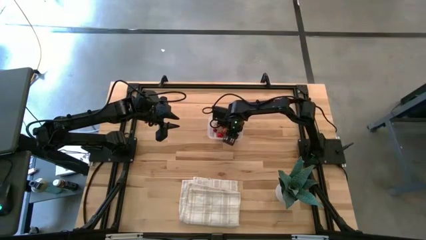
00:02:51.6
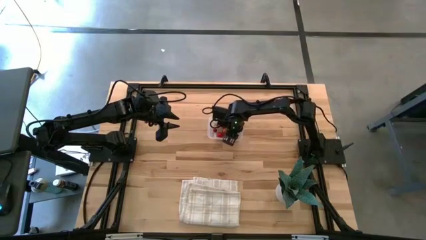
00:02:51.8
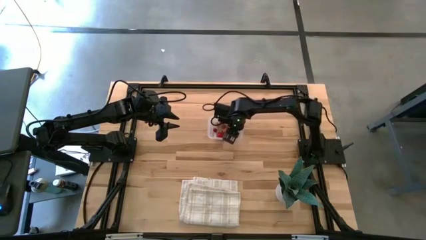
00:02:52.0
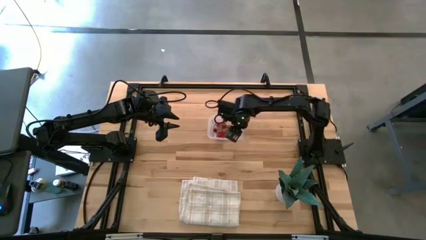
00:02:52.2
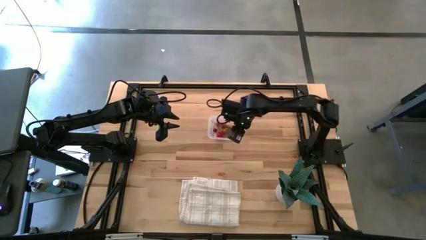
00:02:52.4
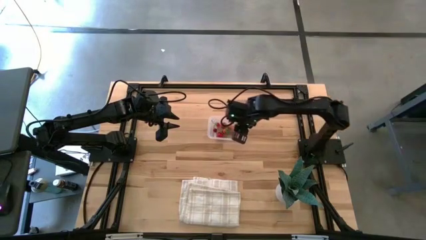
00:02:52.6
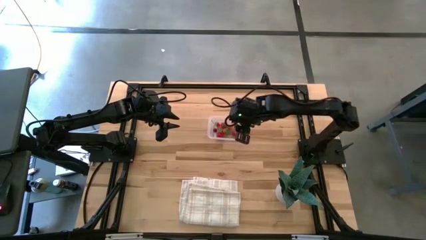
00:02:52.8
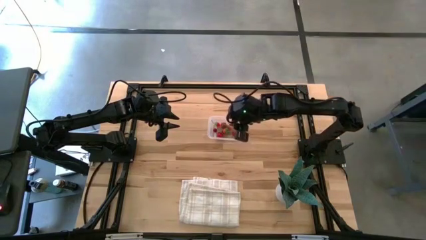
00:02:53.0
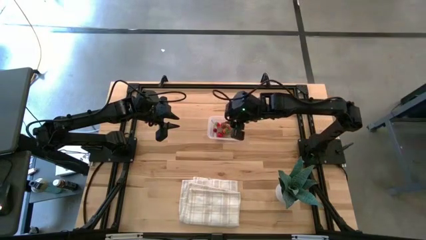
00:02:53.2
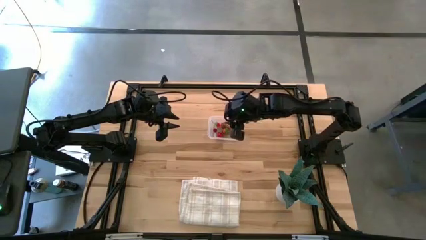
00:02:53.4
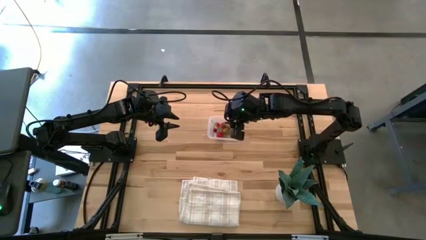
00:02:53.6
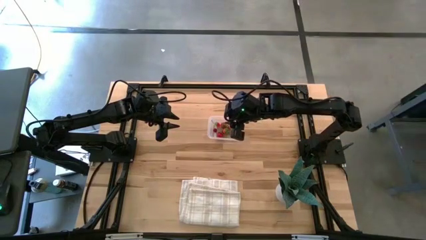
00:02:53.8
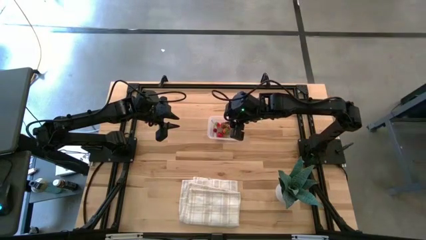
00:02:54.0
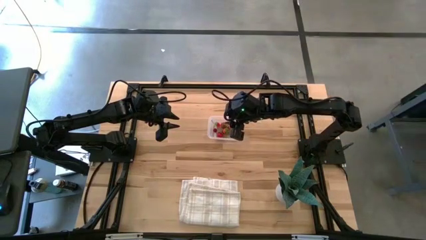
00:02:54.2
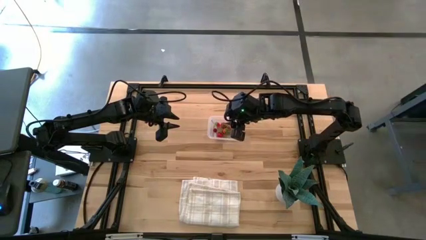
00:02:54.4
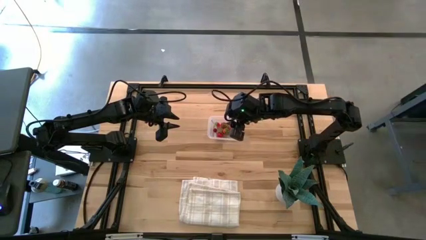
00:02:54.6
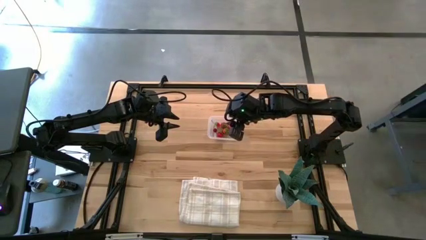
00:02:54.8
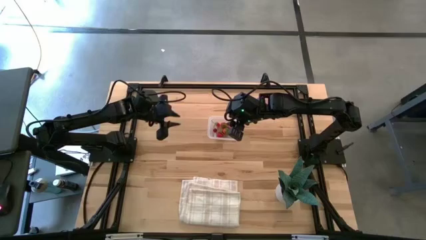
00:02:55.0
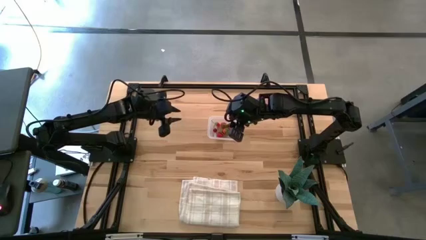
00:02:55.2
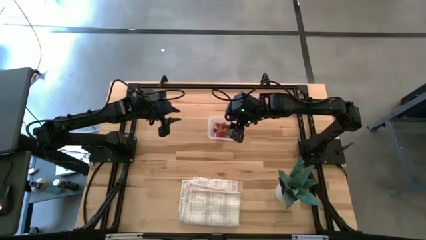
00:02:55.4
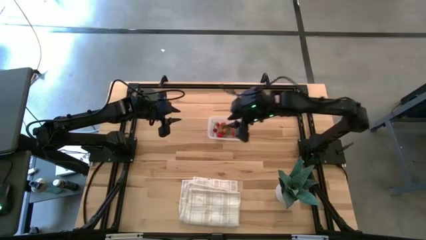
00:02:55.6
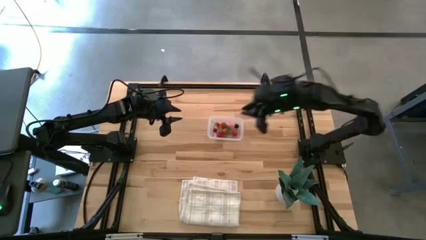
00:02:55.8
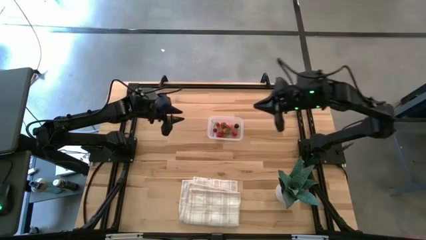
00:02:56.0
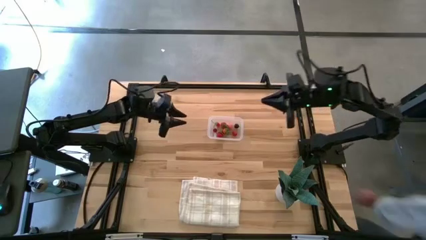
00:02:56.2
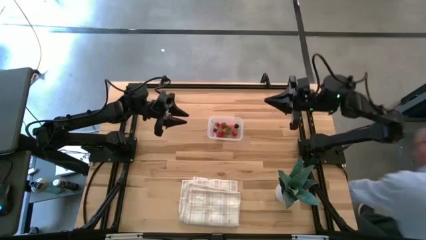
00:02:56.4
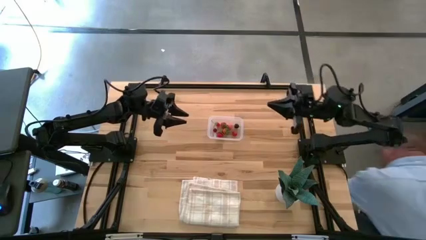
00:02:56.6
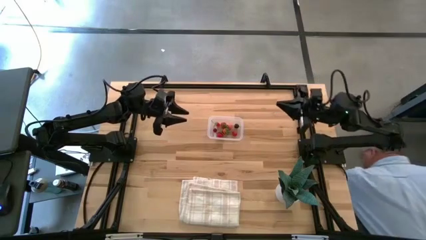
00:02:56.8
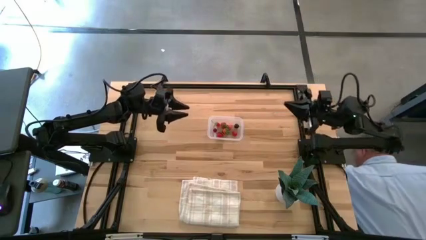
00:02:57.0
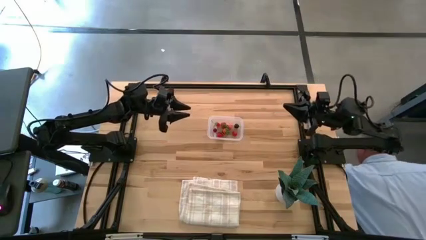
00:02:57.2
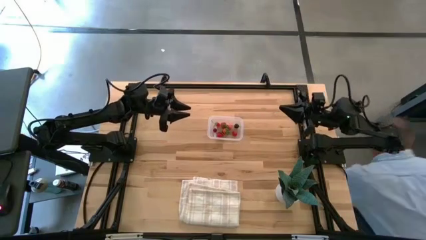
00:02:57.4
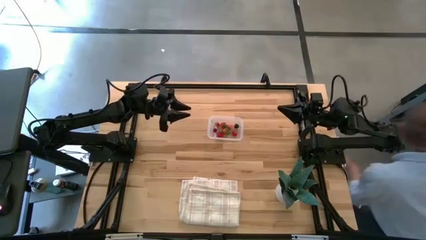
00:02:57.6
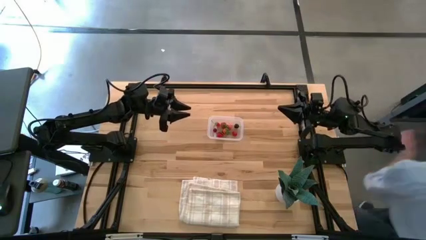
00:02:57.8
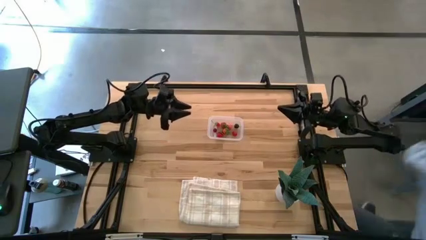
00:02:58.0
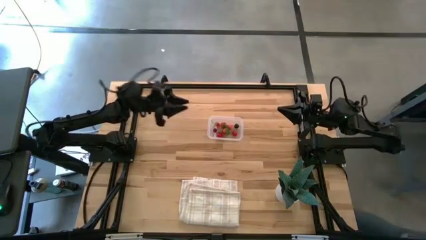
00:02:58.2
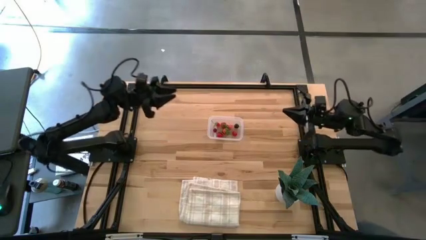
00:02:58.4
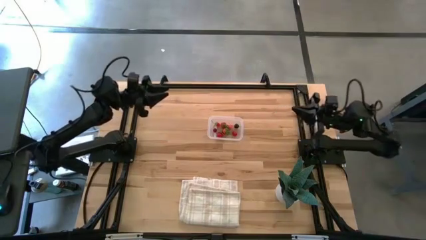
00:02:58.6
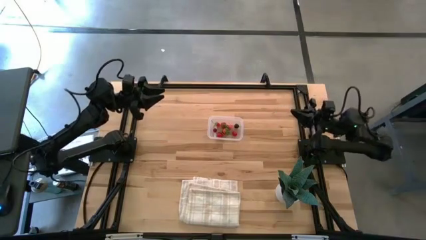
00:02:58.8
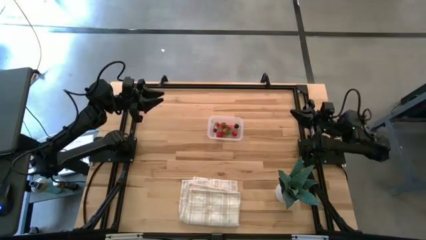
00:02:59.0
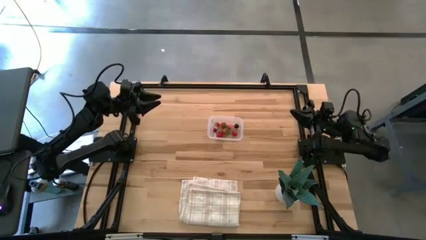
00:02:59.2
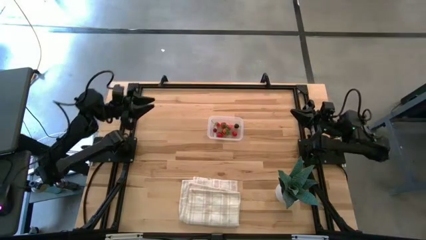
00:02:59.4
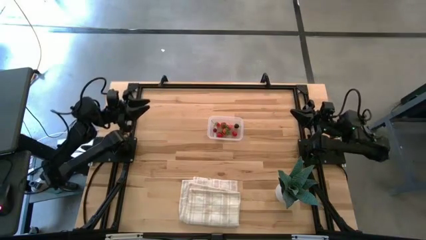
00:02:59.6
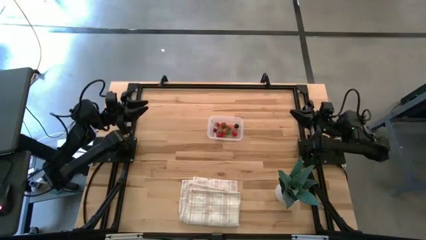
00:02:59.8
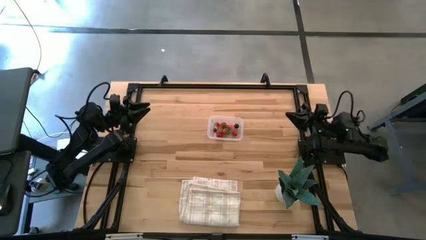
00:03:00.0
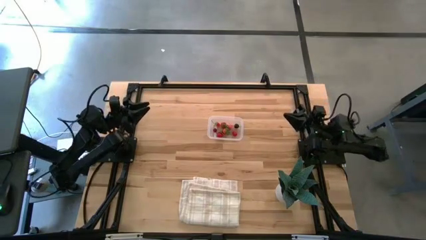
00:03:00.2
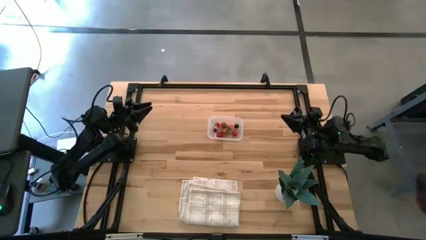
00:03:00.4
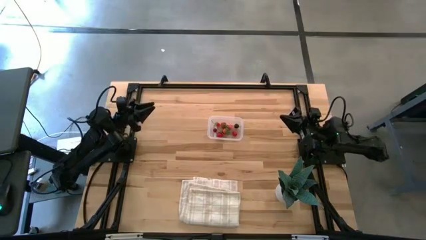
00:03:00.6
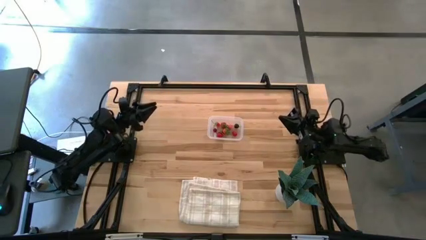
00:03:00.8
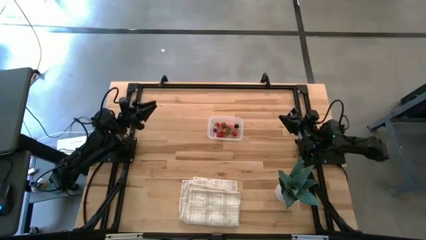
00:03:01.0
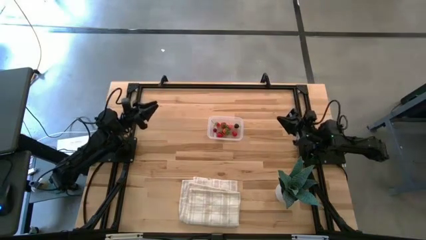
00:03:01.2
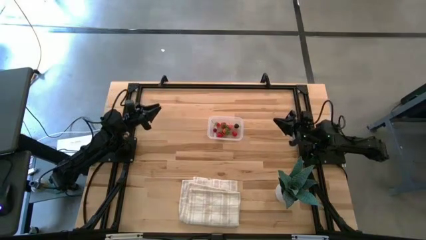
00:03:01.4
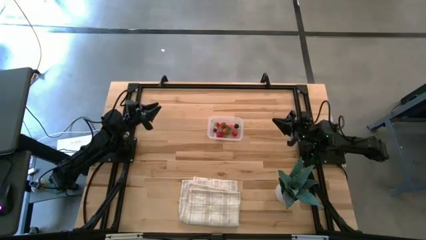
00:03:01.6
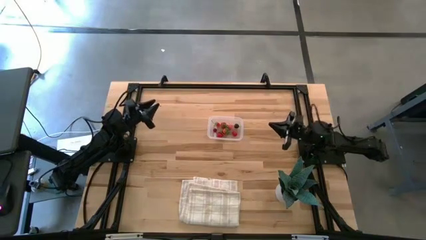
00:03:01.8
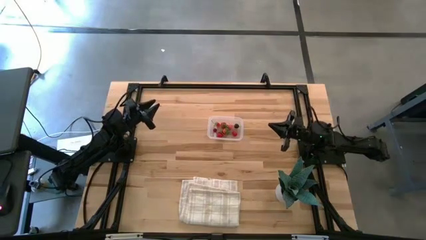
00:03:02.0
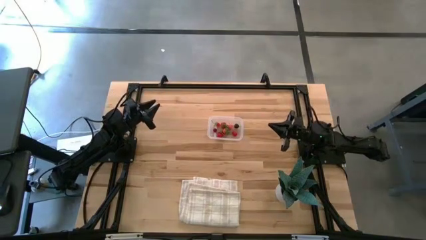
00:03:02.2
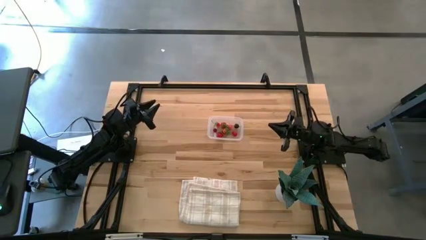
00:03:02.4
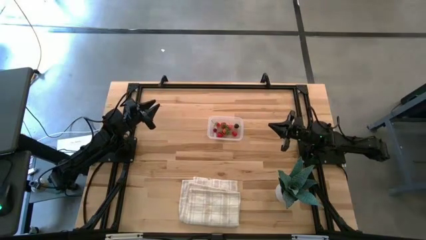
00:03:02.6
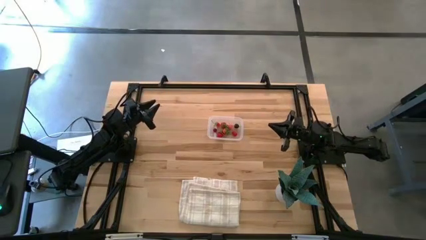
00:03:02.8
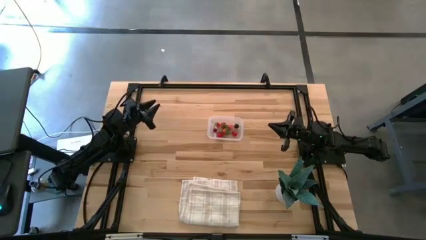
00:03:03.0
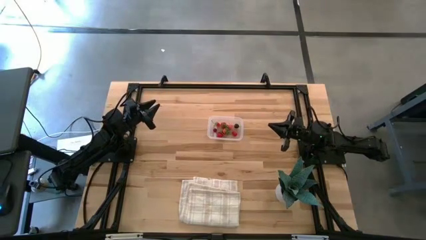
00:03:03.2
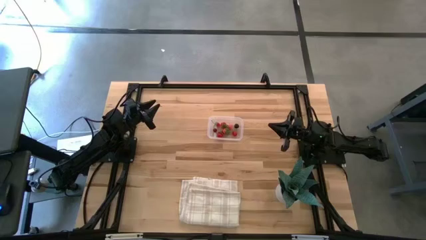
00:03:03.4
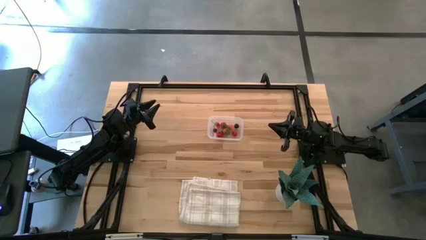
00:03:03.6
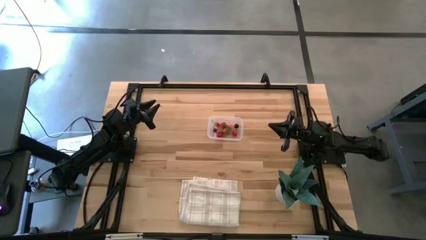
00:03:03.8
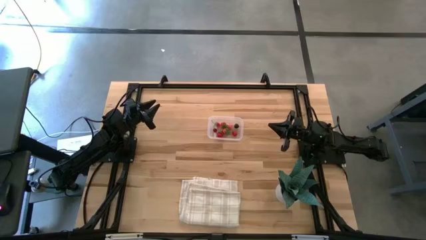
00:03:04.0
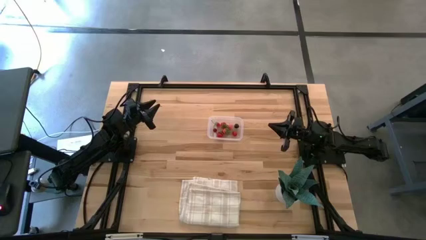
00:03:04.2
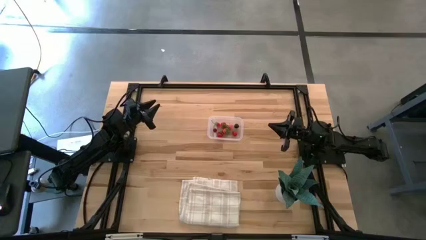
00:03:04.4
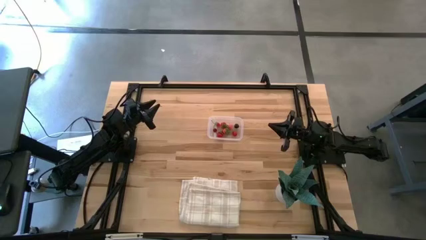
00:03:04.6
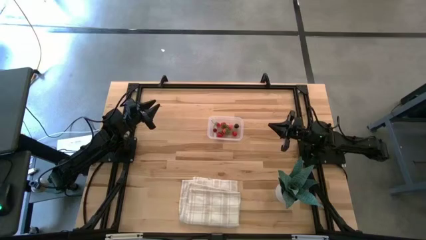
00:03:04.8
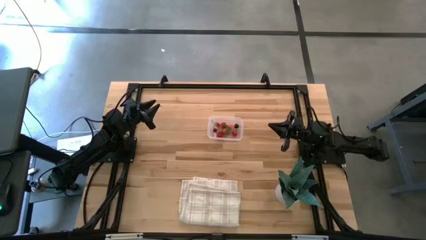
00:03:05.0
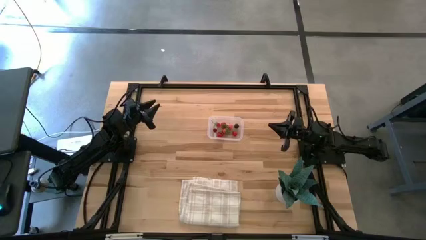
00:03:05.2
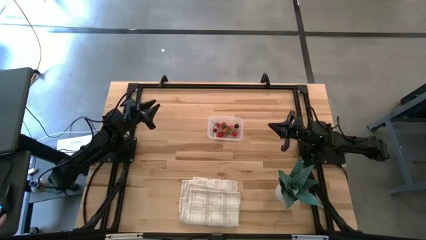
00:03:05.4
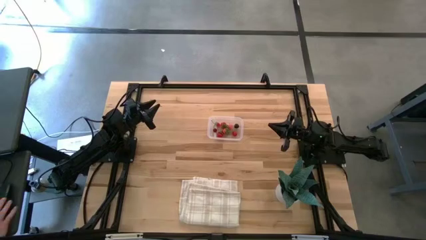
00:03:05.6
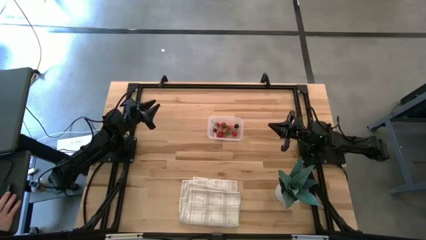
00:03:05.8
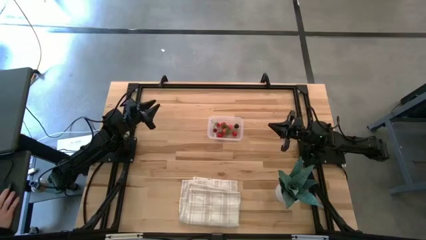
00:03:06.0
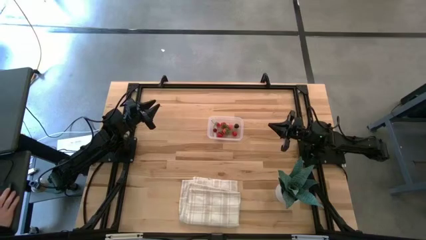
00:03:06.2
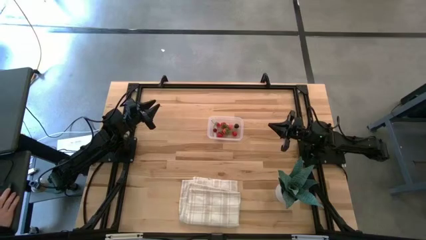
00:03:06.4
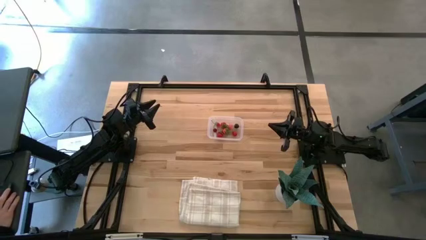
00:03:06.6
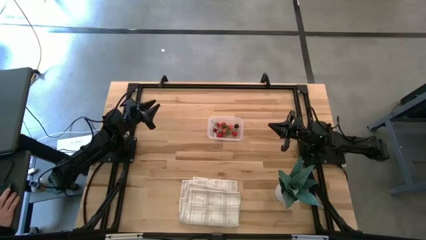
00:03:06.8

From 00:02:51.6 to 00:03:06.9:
Task: Pick and placing Produce into tupperware
Return to Home Position
